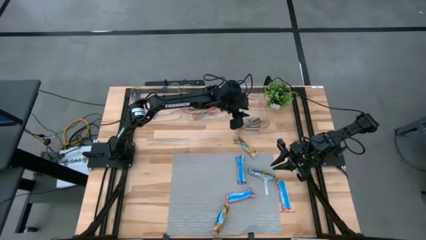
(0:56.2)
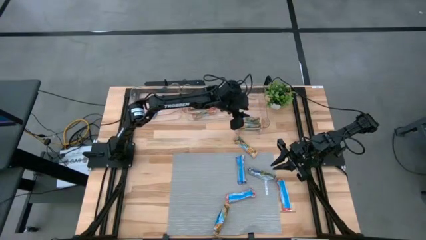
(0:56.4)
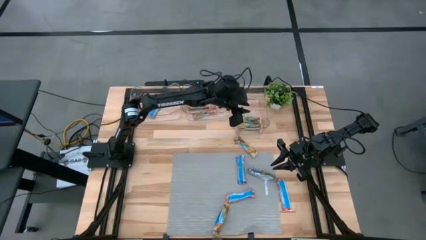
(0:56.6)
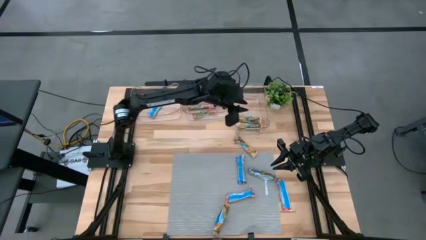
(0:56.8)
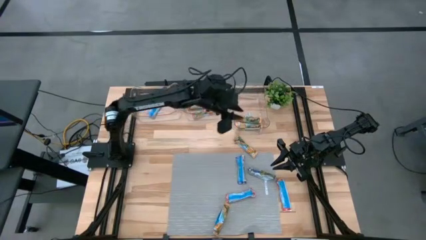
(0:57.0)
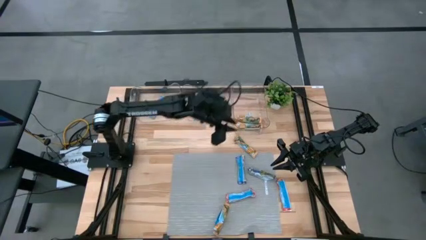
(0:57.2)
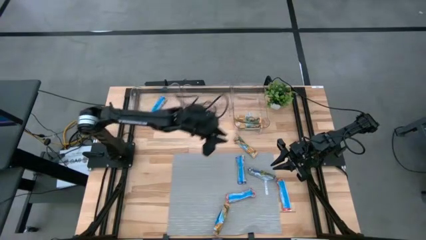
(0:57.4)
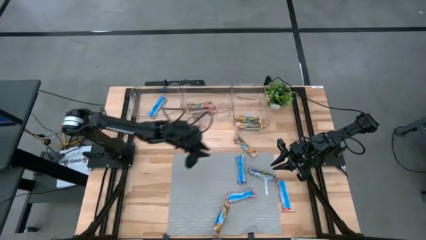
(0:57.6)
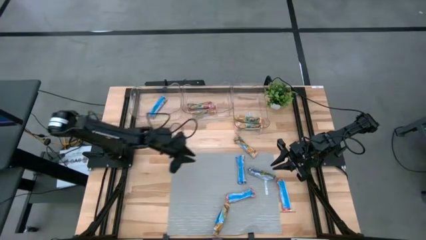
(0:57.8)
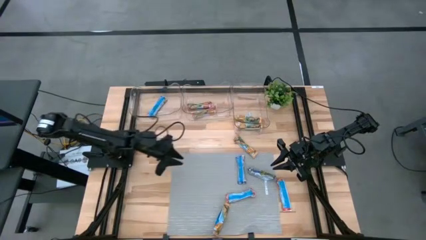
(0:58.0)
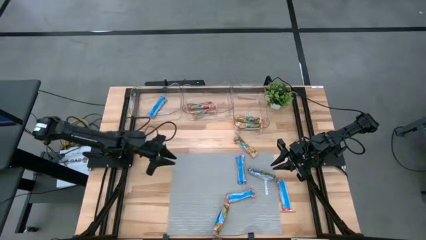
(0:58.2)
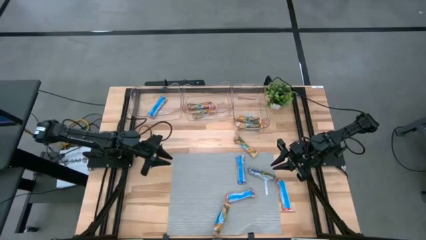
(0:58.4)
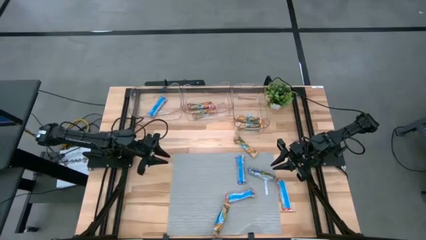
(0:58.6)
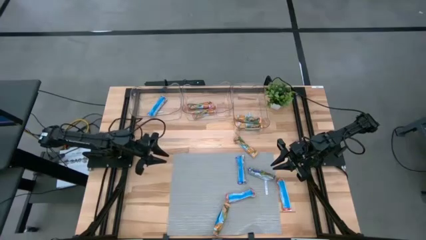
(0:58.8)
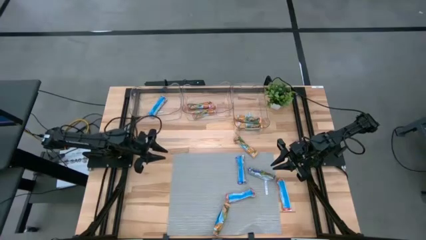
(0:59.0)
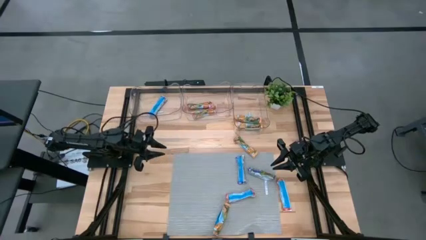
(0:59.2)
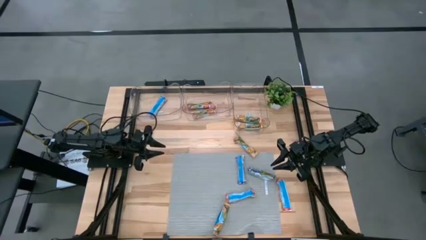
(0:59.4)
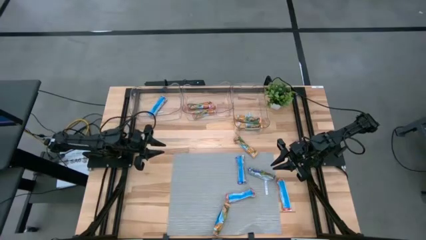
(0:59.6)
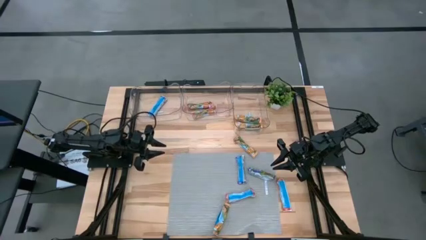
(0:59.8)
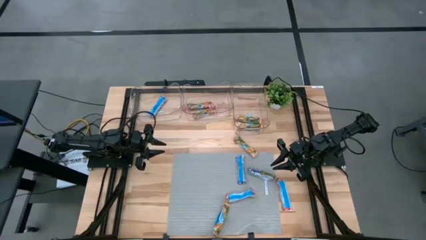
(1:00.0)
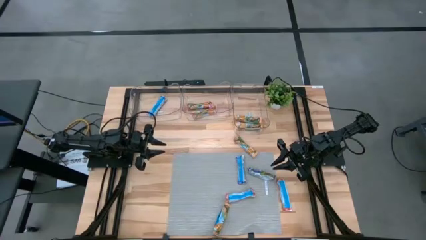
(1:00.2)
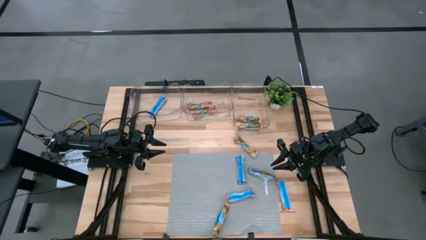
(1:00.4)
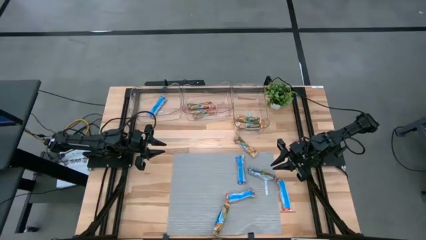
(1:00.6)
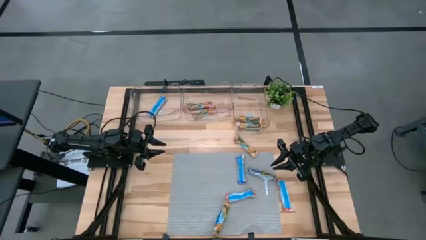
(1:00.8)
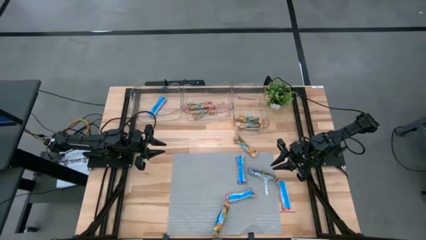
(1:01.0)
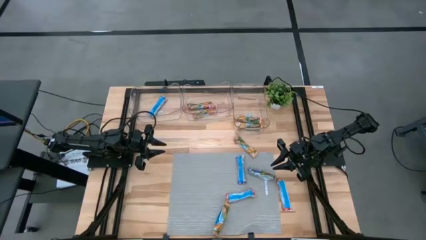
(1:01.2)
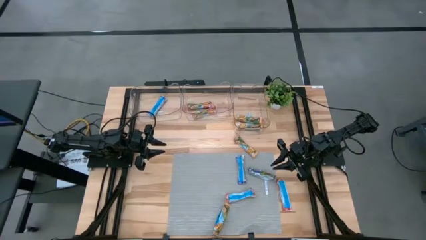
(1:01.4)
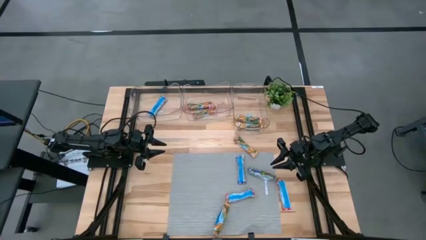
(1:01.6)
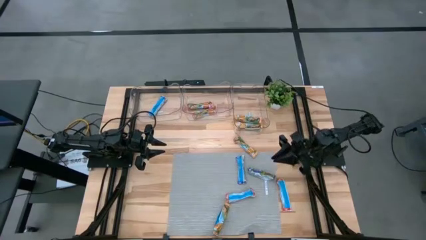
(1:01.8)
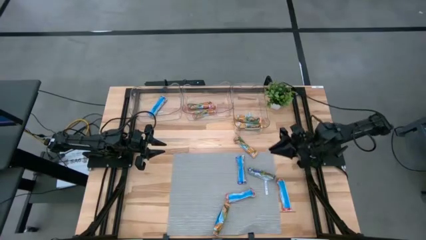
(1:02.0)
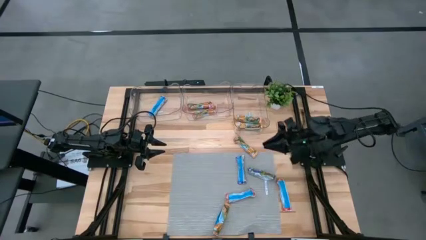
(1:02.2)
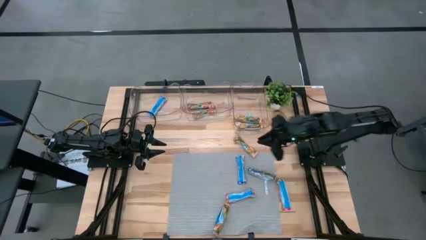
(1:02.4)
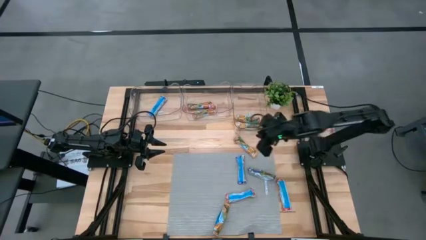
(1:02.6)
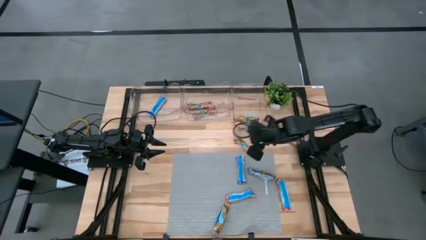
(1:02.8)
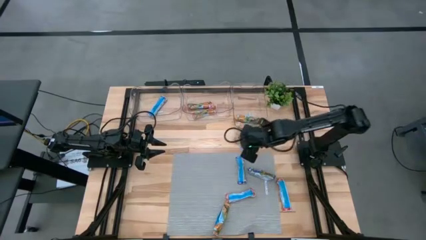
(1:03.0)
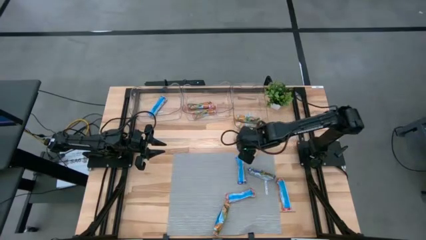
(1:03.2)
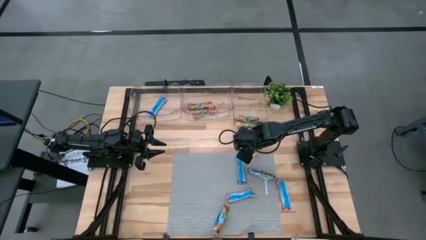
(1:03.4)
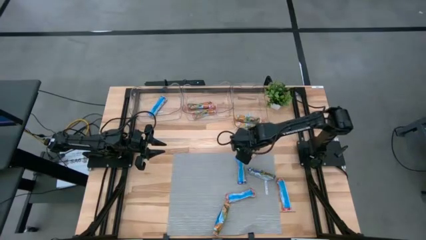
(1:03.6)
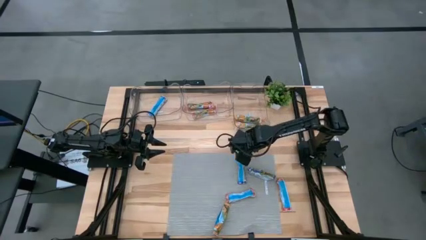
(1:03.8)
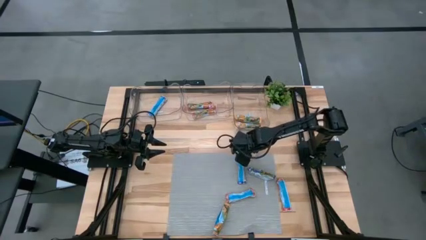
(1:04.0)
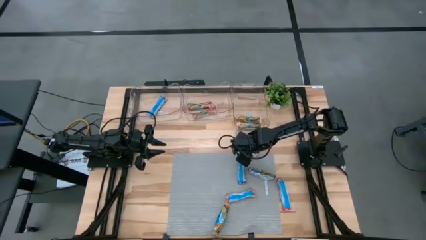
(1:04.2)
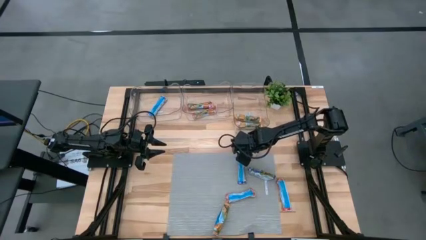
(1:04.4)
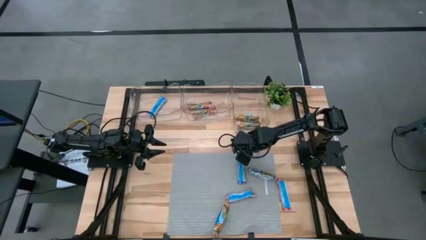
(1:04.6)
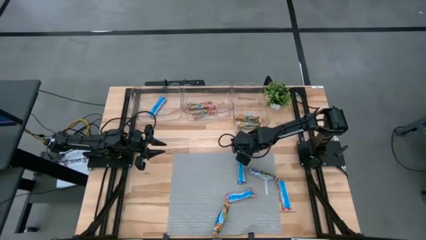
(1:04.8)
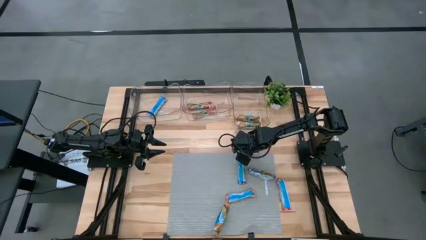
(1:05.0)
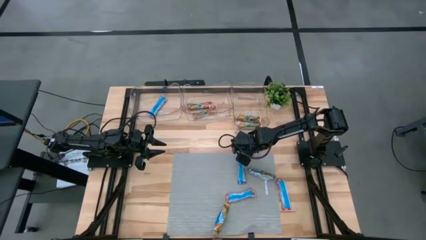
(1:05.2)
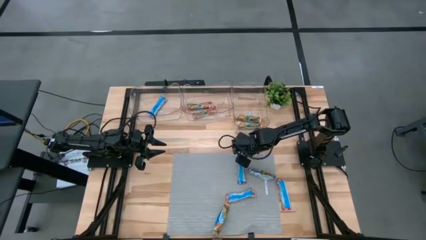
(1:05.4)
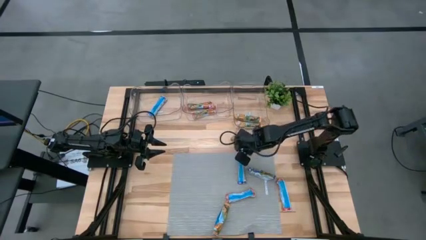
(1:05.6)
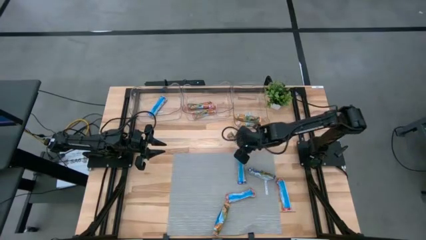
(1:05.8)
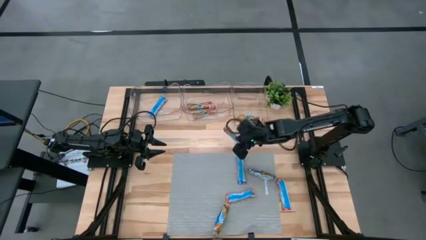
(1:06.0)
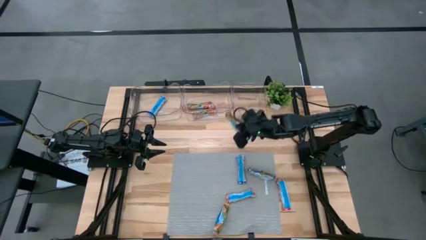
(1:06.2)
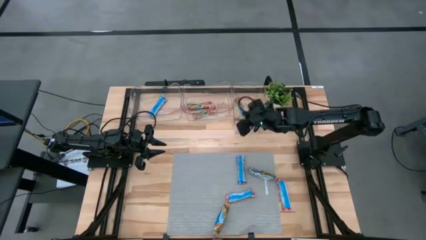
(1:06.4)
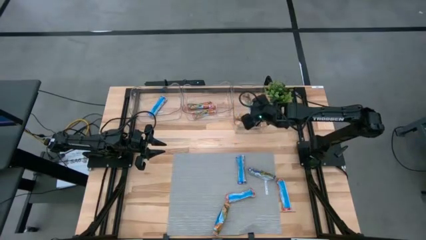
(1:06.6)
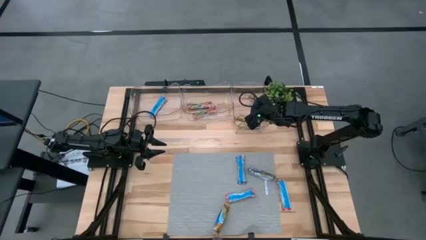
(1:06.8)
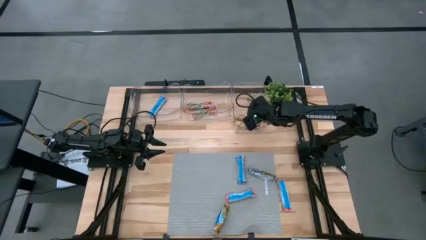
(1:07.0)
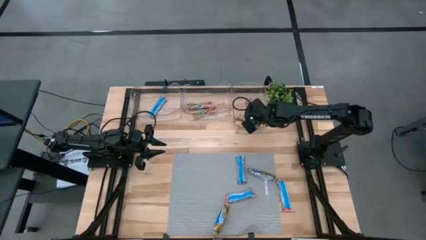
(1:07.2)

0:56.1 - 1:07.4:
Task: Pick and place Granola Bars by type
Put the yellow granola bar into the right transparent bin

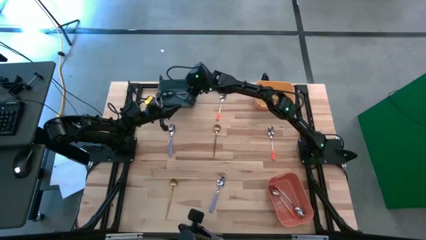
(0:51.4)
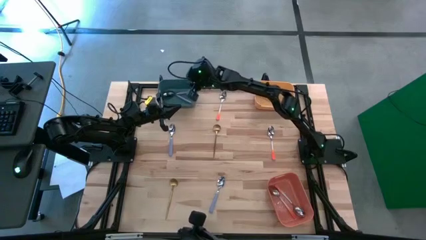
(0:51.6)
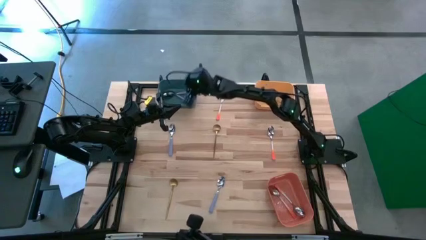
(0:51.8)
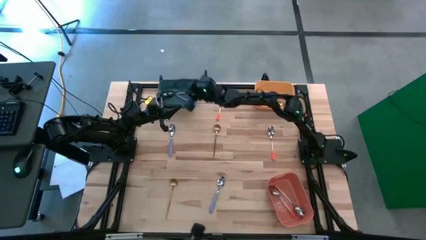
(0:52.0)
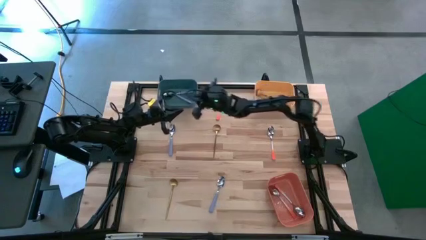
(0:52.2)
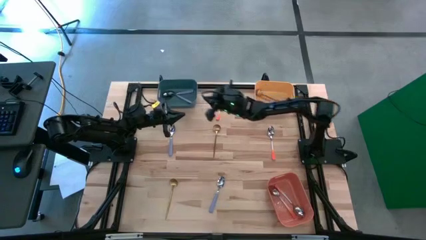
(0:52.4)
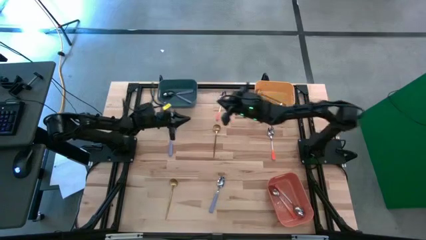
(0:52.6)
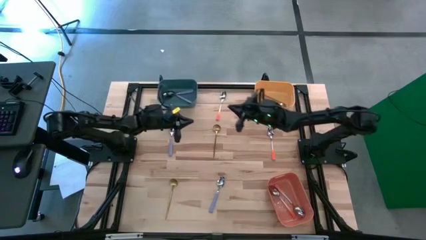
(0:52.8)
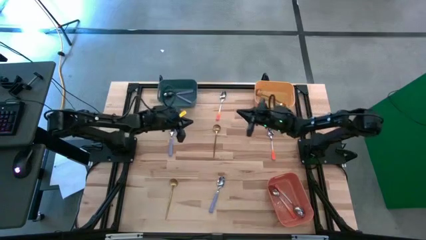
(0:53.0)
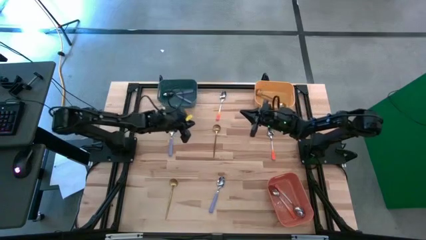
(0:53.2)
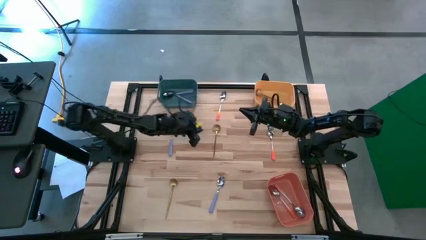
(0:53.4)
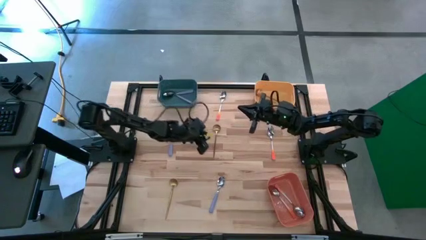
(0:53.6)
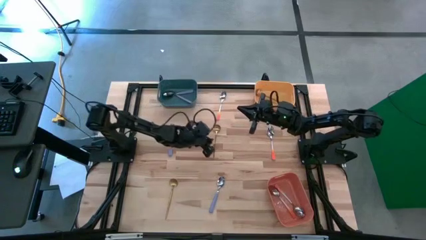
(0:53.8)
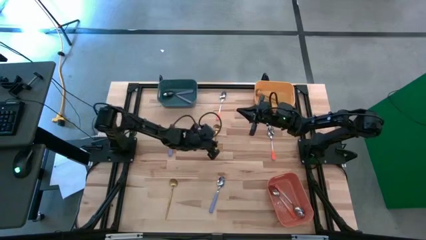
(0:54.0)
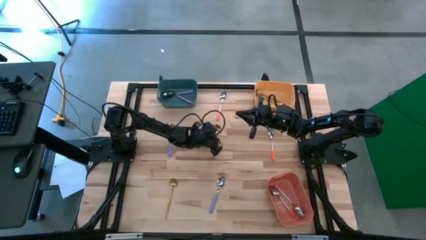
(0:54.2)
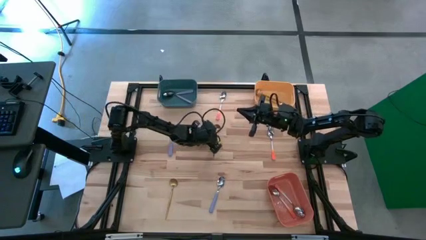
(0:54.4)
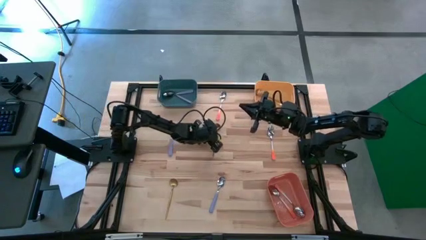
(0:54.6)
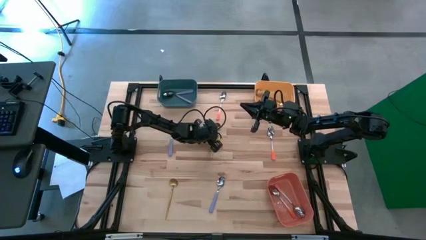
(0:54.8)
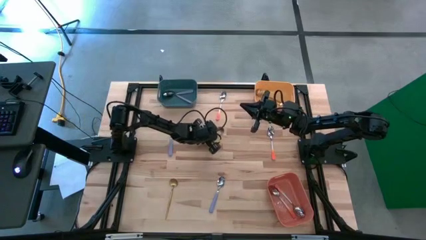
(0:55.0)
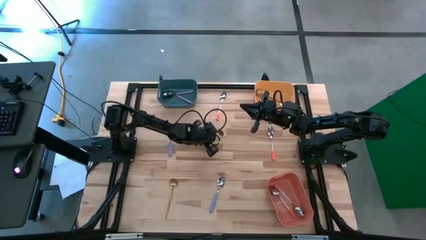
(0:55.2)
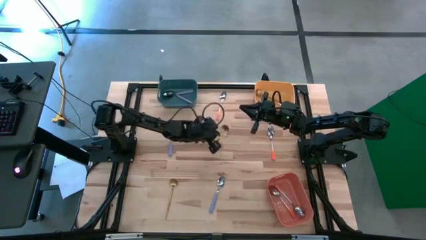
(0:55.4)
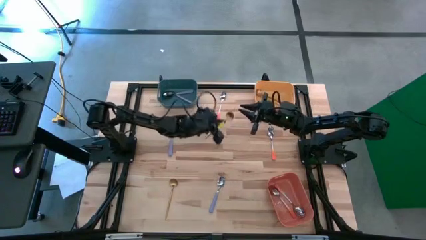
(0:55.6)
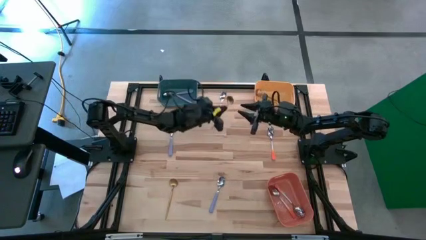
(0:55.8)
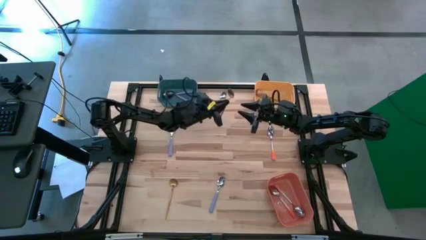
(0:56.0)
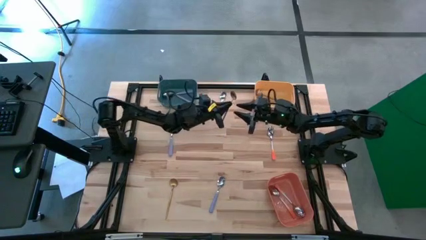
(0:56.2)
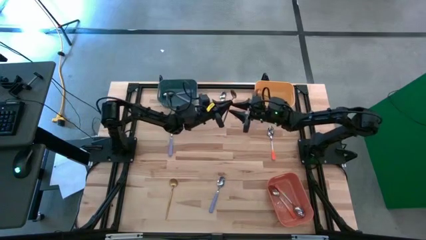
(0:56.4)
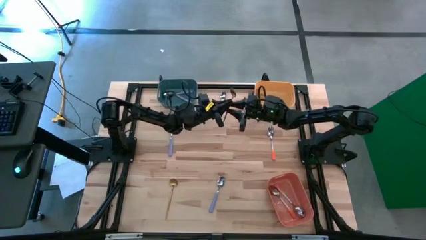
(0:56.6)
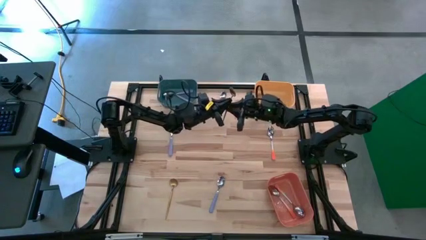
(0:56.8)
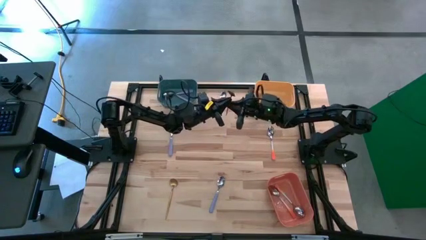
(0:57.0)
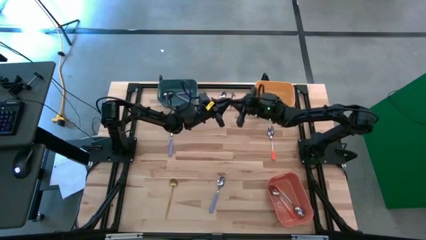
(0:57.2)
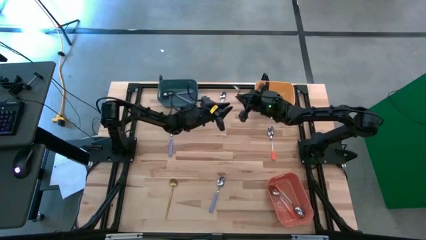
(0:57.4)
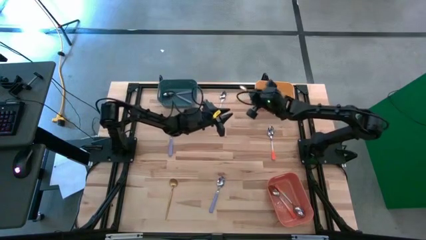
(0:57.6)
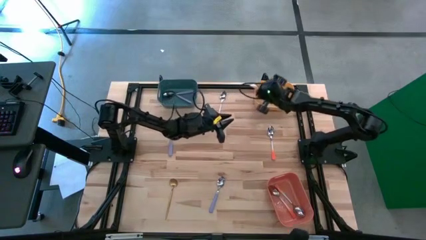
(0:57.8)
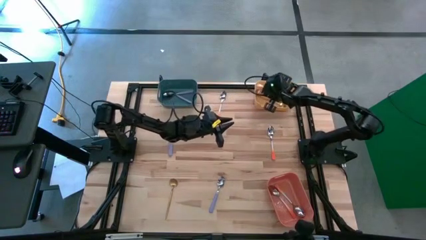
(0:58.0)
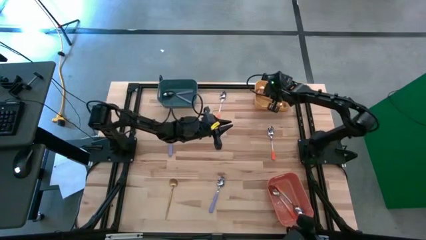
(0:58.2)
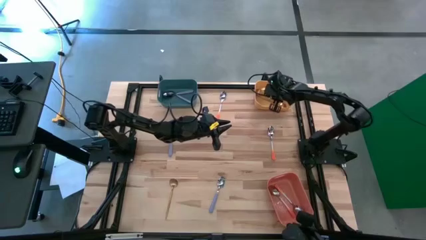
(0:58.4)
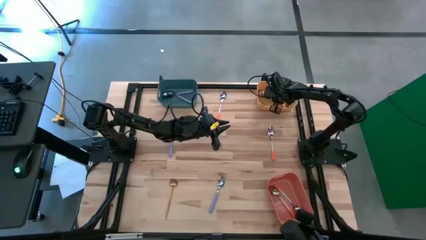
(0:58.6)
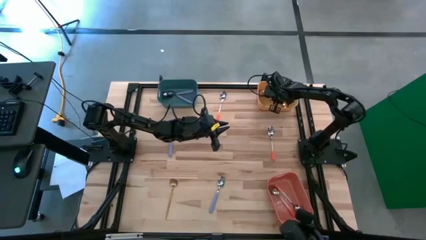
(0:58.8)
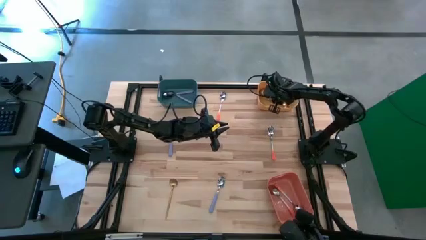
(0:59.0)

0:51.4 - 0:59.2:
Task: Sort silverware by color (type)
Put the center gold spoon into the yellow bin
